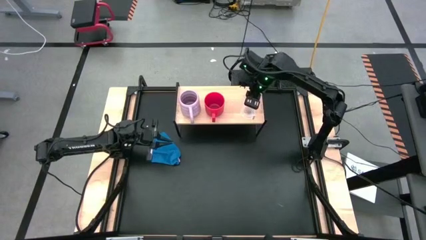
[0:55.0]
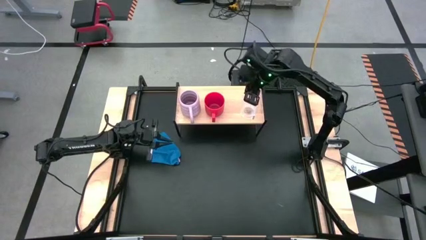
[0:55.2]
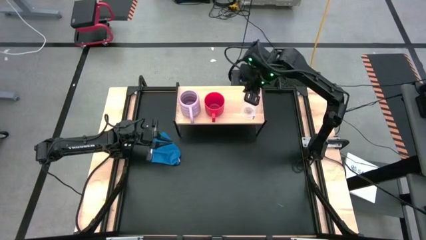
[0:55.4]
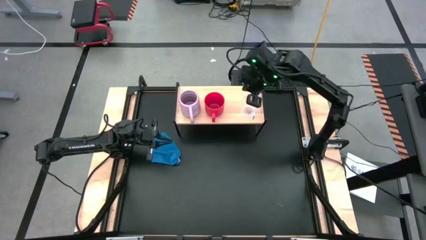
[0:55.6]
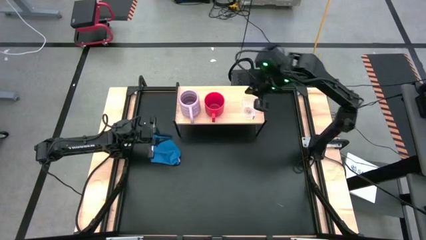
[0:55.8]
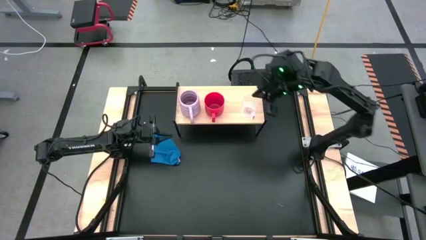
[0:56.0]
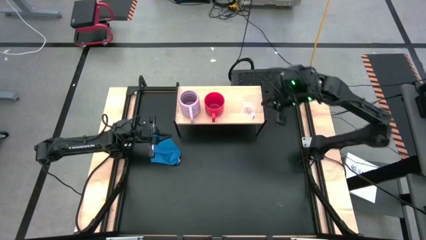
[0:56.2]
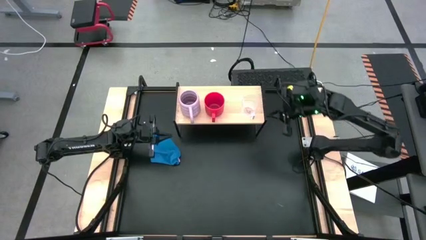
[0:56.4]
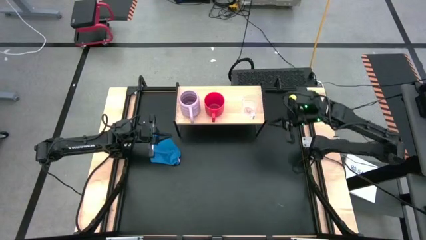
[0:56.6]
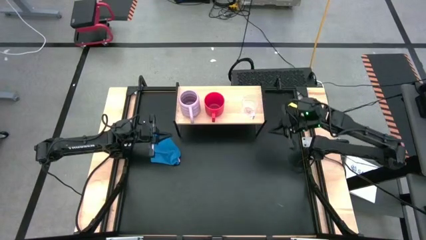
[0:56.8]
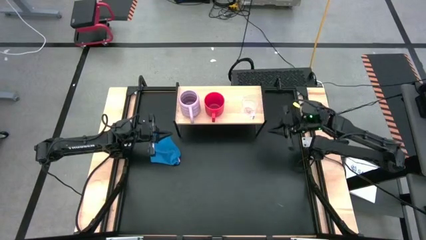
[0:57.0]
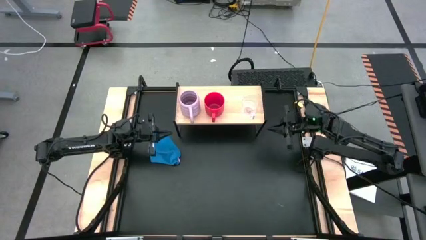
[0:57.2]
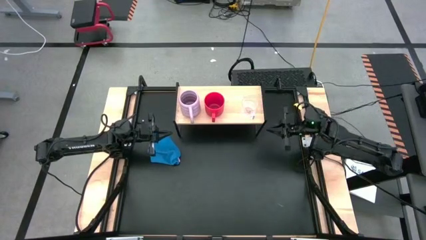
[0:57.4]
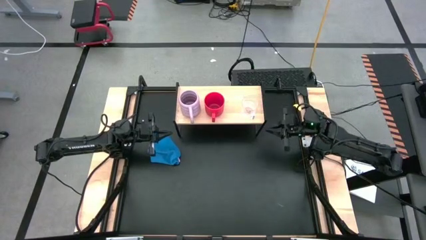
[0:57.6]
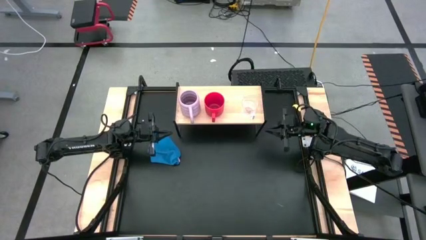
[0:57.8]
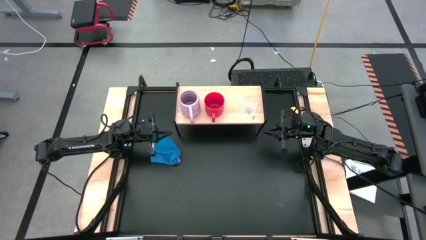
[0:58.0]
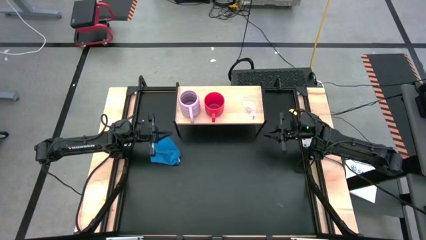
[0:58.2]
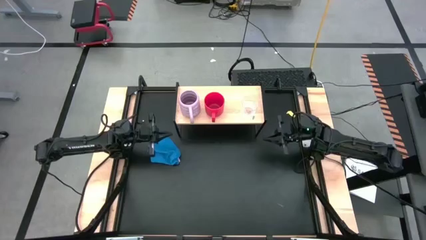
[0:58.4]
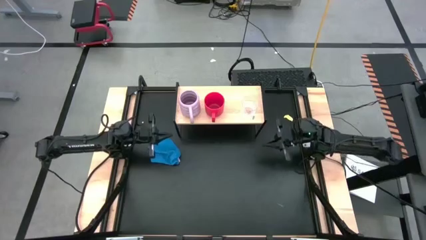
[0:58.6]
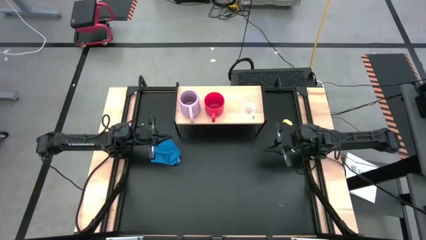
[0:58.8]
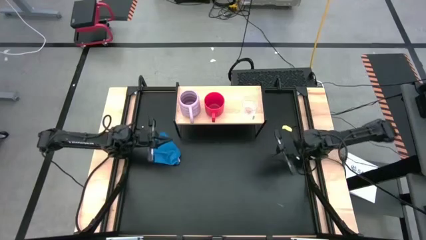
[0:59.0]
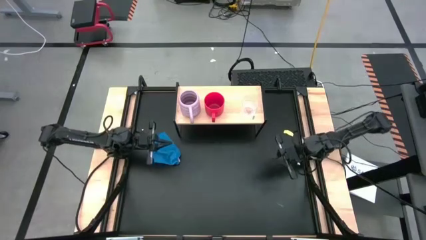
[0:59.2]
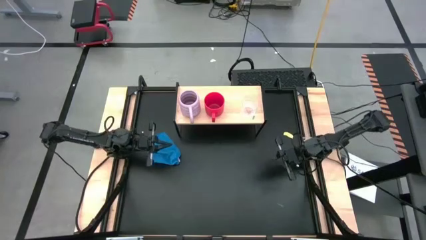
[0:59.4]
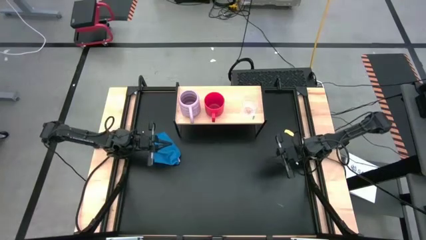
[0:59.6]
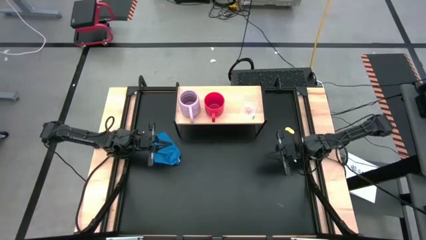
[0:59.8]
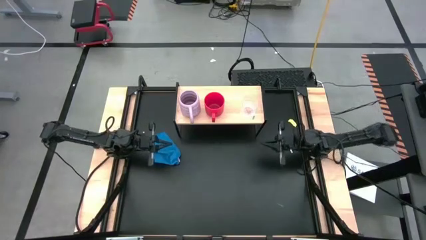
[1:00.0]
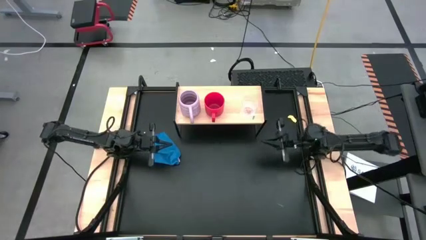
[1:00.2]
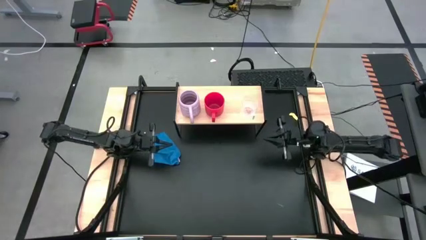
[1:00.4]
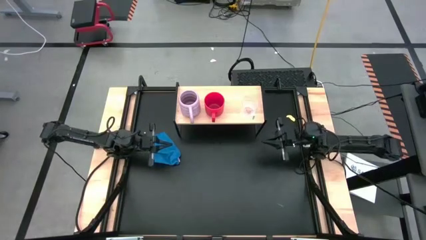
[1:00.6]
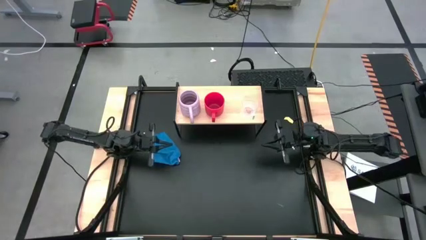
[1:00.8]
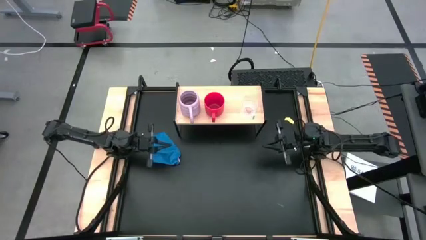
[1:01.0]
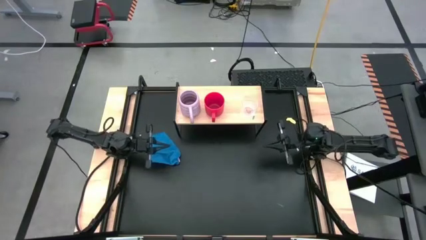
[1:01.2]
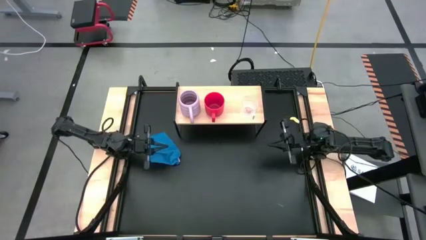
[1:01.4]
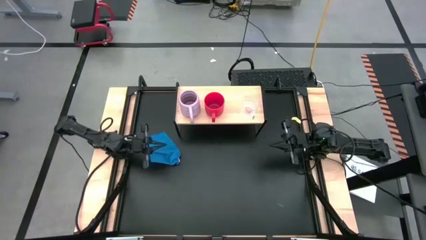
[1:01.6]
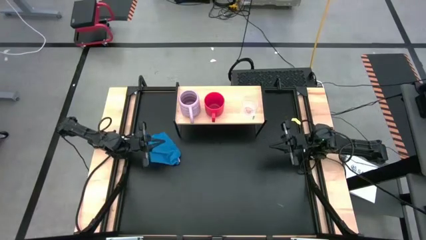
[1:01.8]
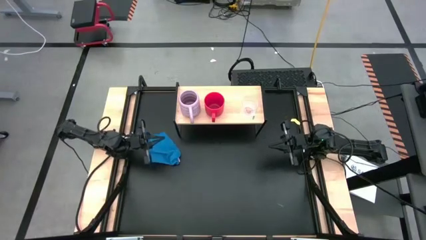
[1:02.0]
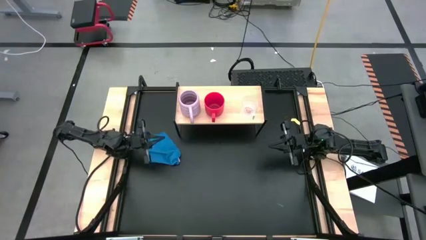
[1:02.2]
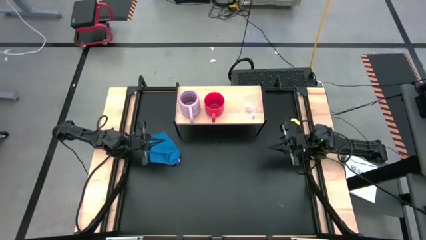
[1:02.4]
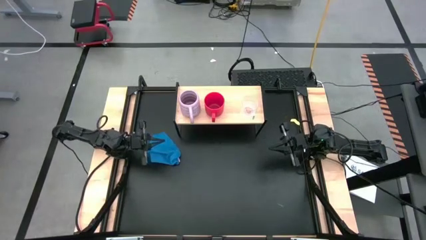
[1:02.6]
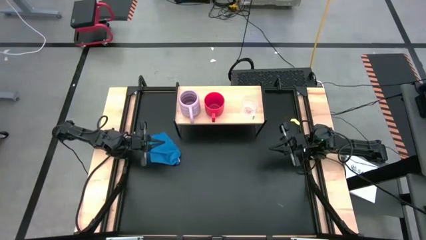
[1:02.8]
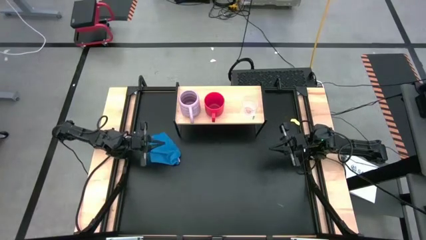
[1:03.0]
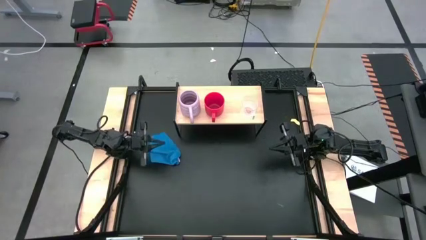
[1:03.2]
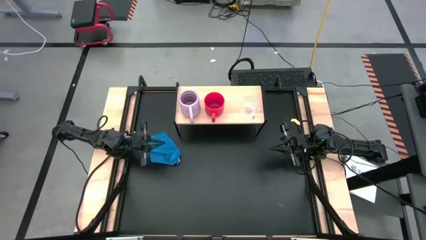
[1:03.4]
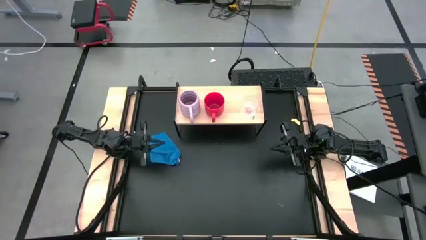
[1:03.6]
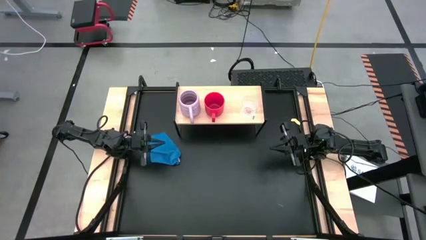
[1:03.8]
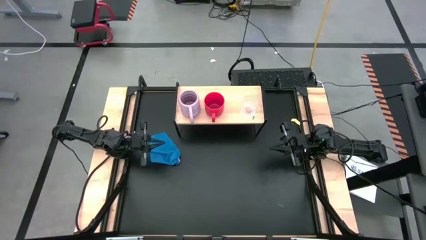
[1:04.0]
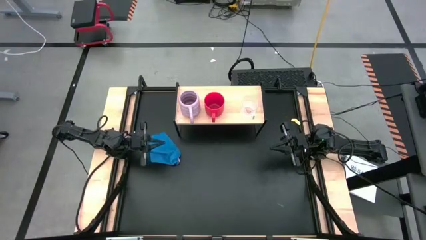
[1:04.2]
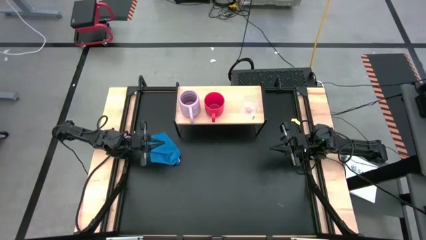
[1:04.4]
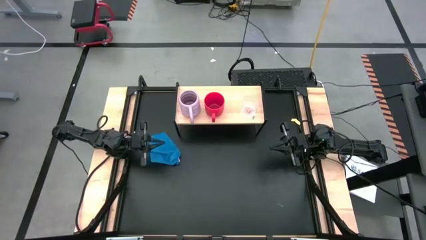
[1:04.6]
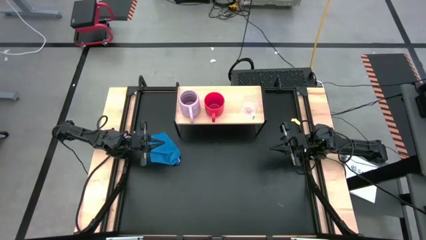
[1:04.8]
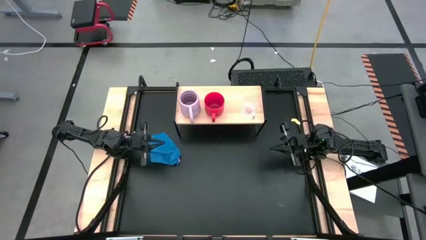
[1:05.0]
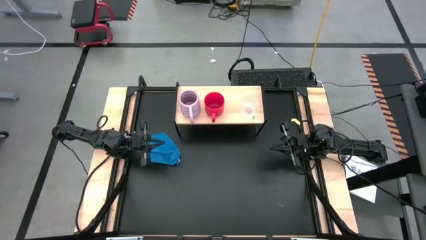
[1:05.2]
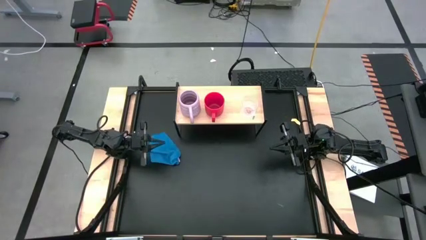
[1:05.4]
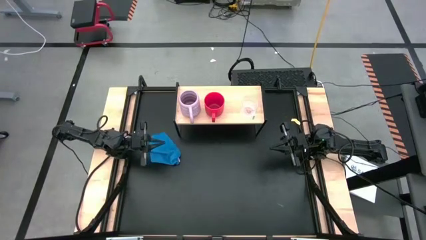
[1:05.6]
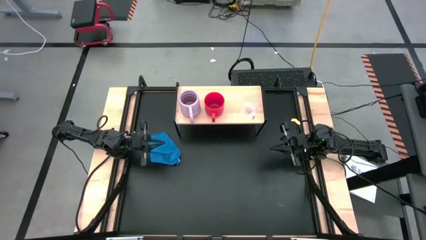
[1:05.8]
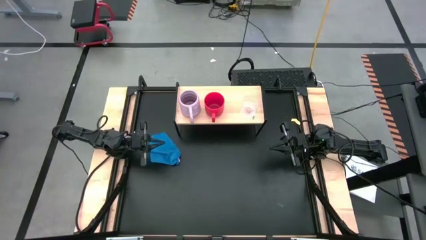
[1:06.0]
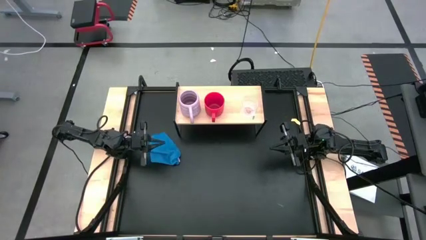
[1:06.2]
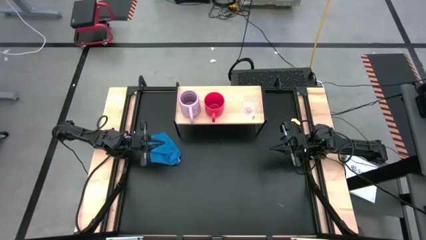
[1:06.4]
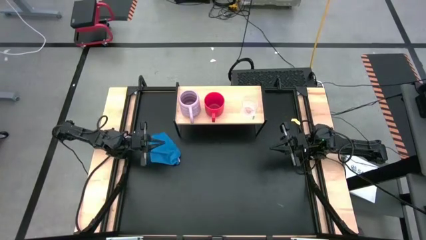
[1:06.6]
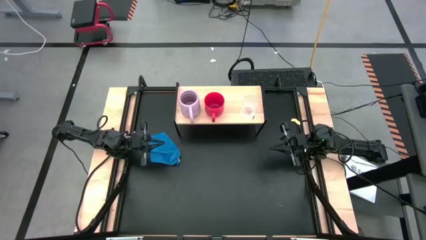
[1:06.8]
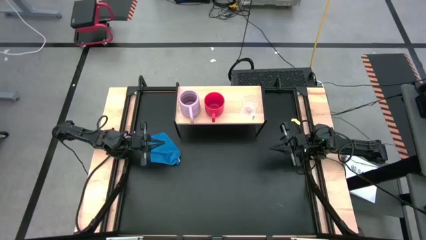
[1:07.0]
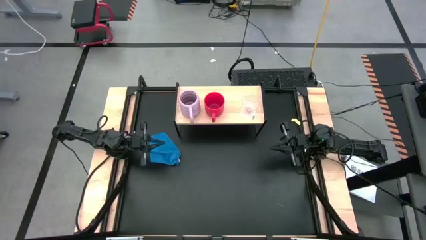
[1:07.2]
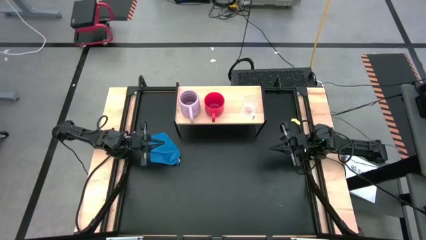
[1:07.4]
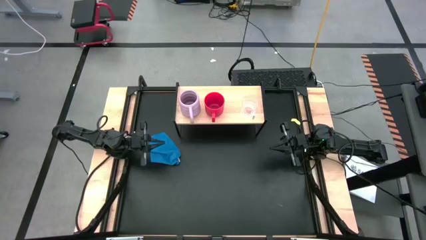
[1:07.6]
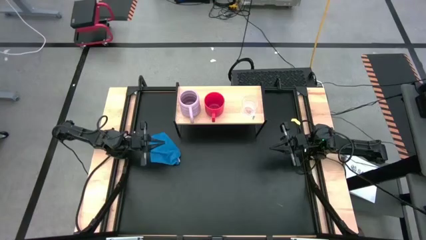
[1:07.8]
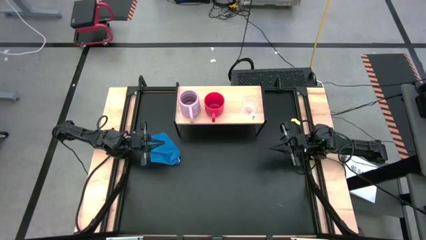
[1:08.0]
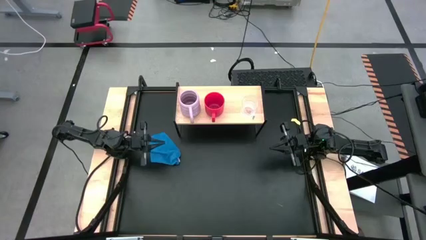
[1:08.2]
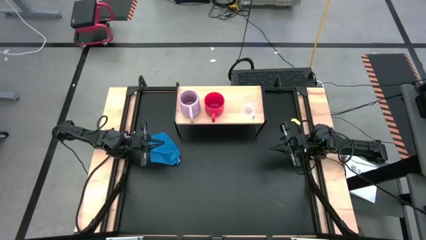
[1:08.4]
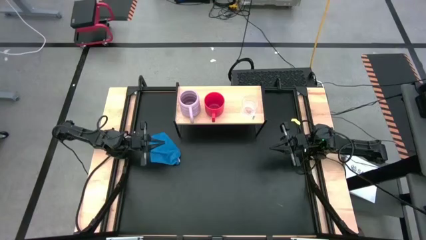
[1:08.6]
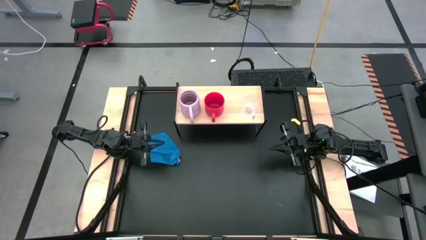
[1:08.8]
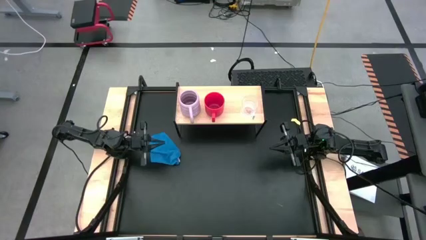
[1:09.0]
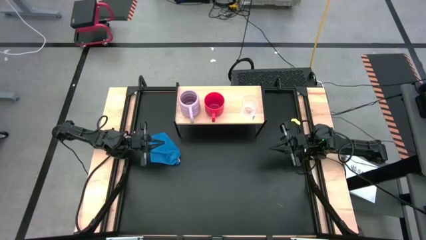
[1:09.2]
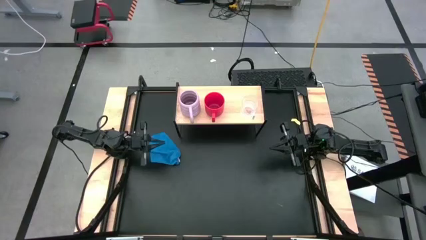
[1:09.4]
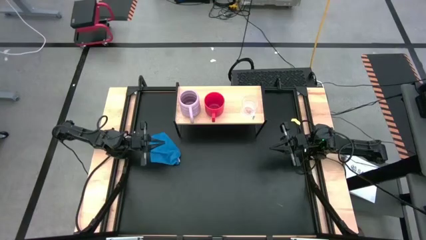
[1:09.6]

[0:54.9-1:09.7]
Task: Stack small to large cups/mugs on shelf
Return to Home Position

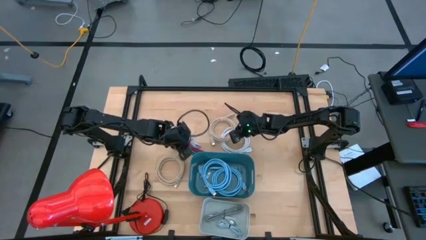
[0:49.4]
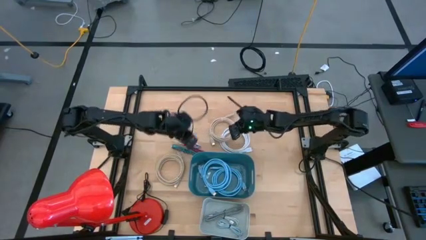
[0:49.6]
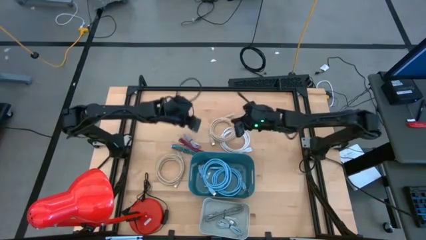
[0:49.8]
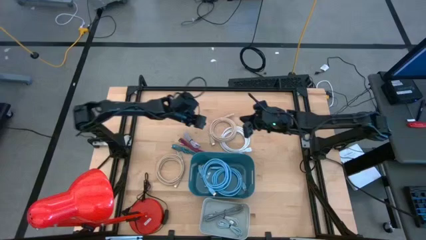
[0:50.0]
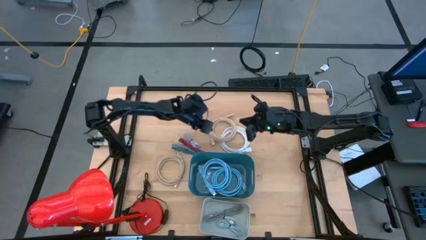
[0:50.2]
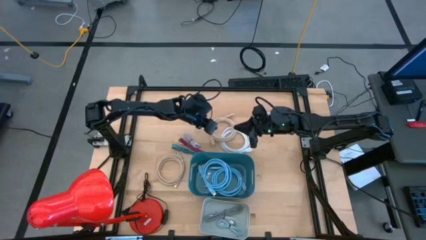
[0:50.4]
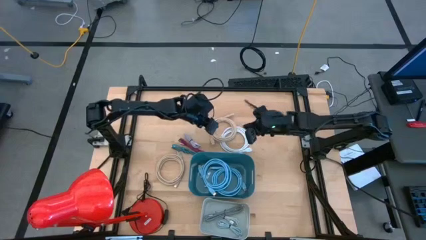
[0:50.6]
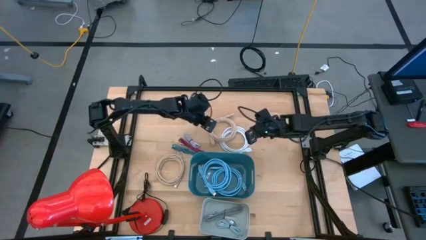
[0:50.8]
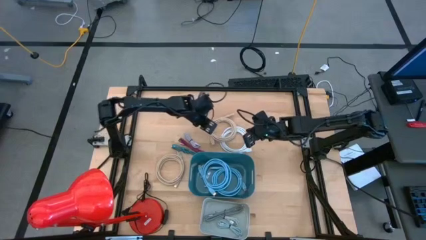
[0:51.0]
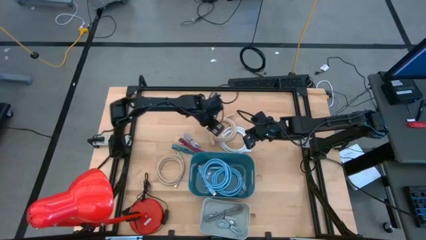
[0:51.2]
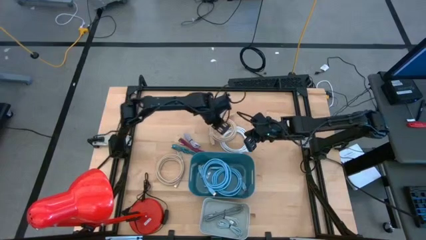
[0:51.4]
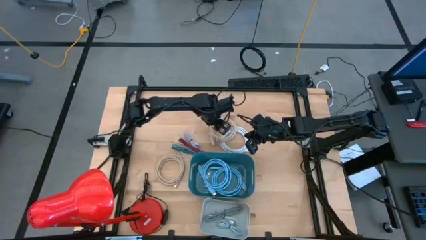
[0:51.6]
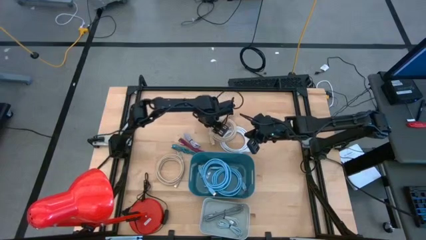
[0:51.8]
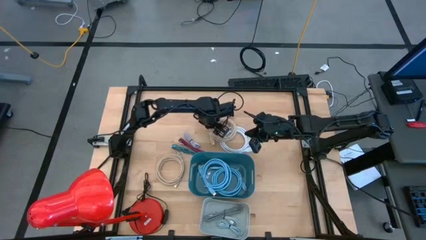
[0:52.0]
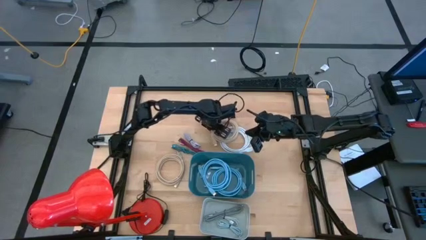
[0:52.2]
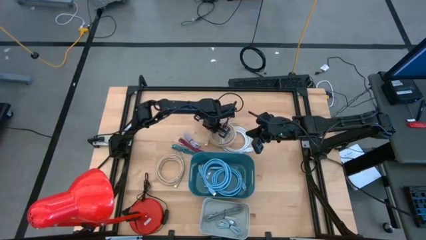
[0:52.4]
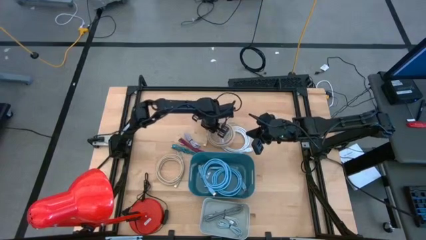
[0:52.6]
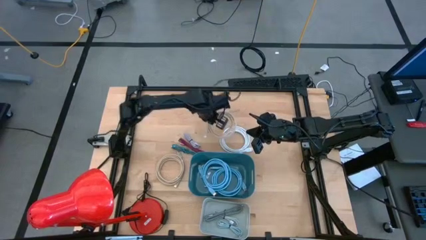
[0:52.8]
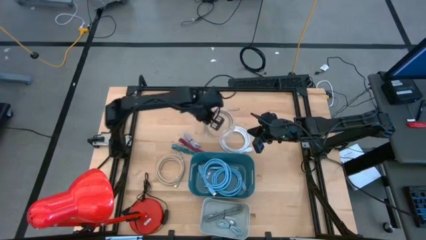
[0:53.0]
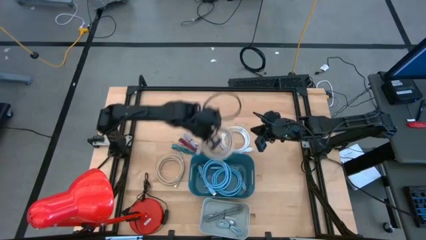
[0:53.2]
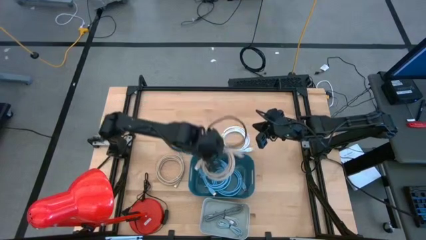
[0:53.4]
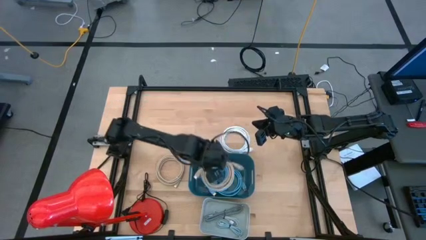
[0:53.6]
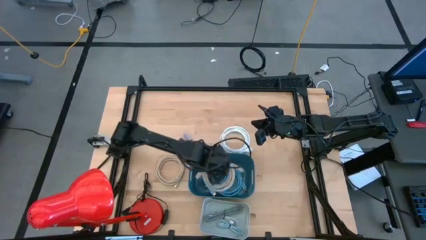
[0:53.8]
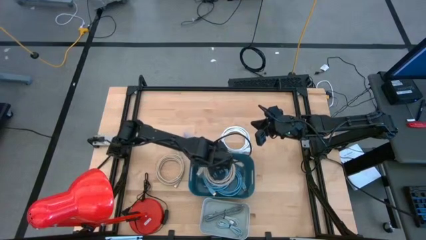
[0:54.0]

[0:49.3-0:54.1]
Task: Pick & Place USB Port
Put the top brown HDMI cable into the blue bin
